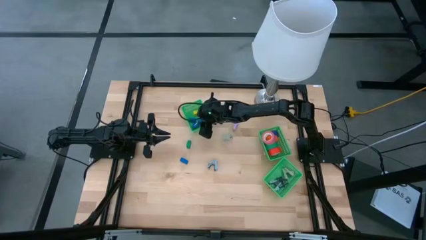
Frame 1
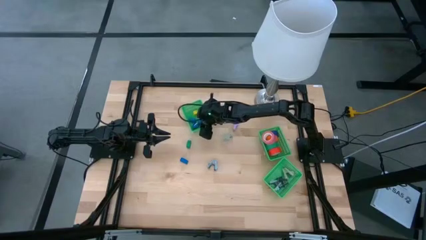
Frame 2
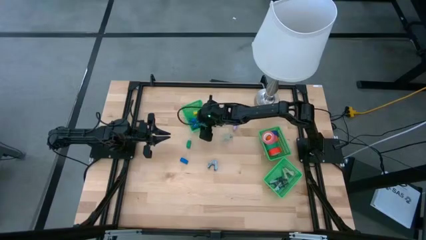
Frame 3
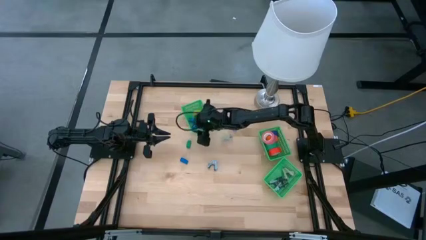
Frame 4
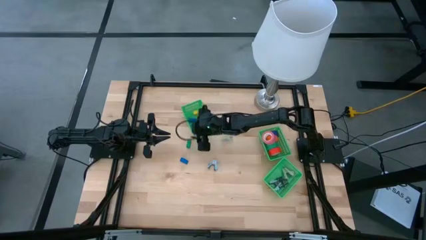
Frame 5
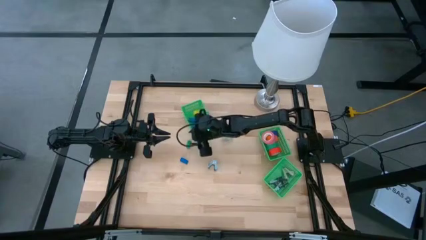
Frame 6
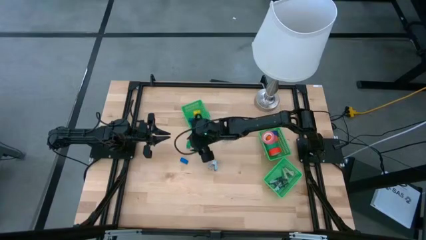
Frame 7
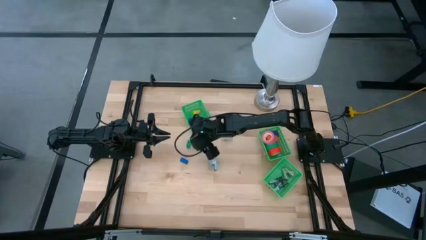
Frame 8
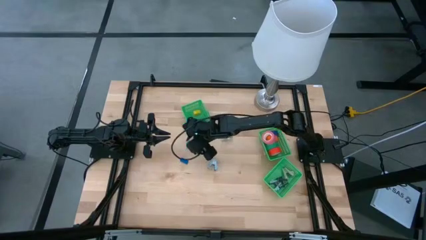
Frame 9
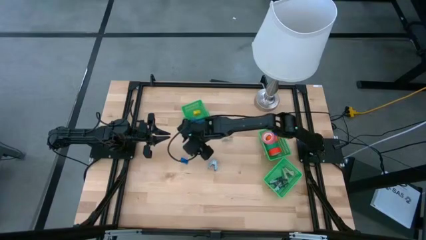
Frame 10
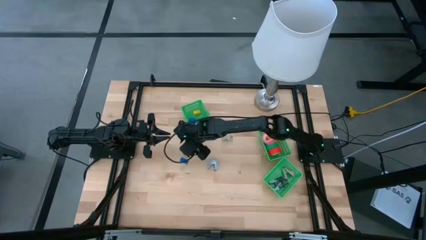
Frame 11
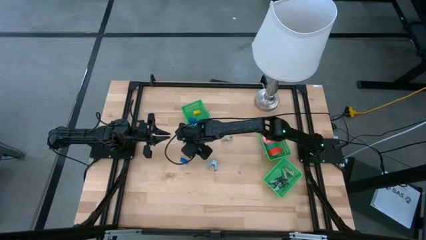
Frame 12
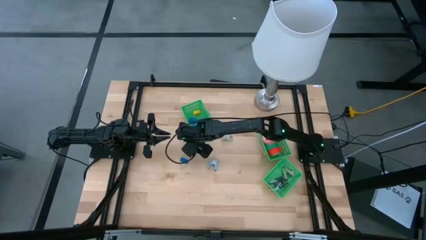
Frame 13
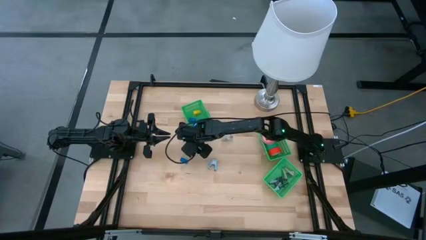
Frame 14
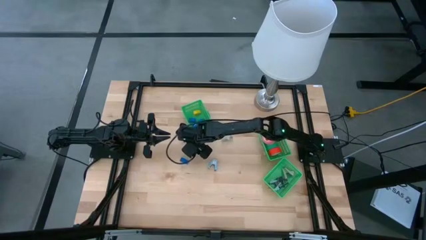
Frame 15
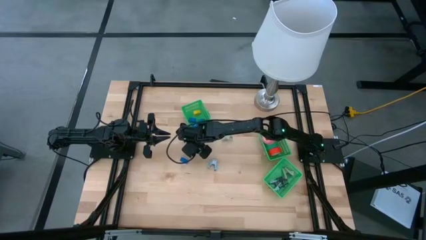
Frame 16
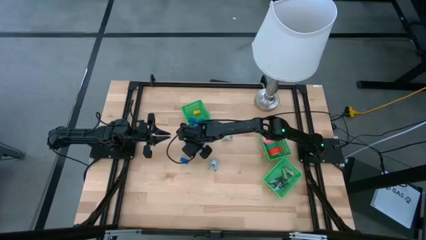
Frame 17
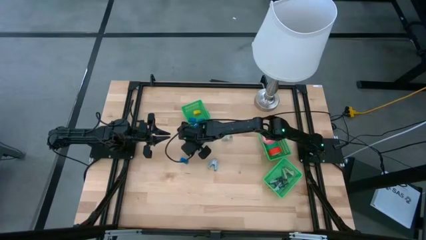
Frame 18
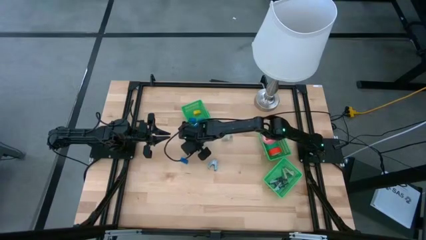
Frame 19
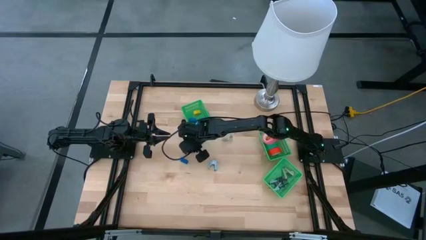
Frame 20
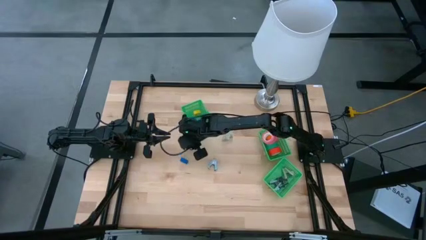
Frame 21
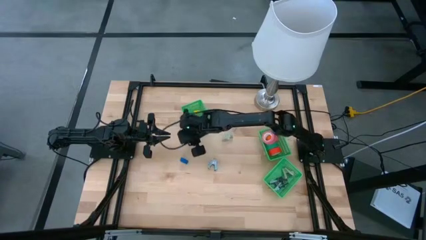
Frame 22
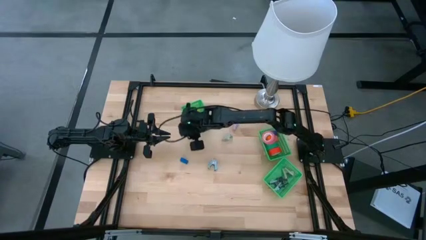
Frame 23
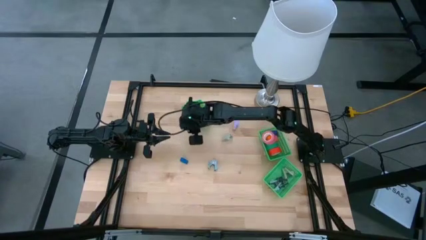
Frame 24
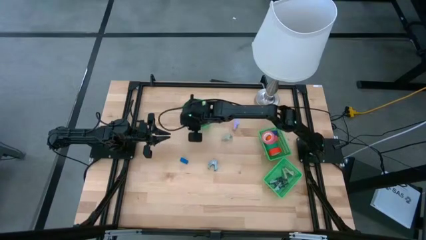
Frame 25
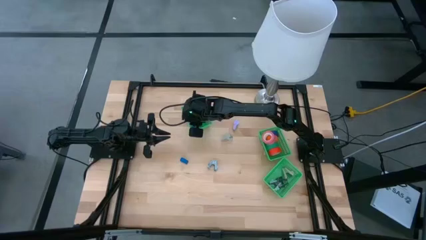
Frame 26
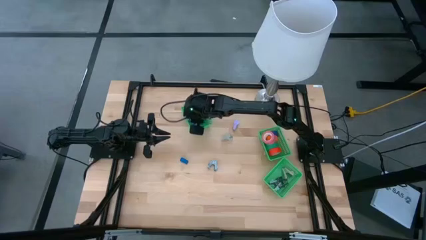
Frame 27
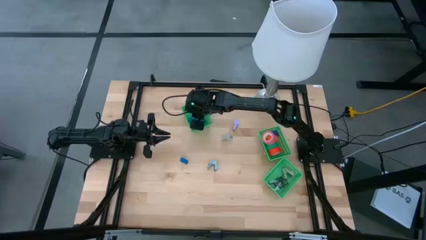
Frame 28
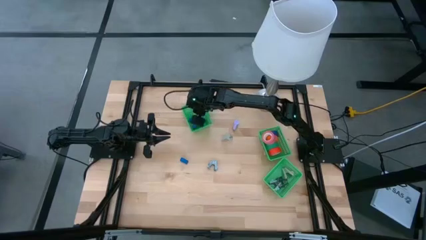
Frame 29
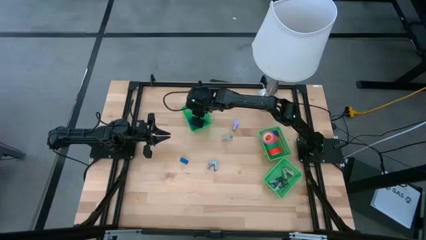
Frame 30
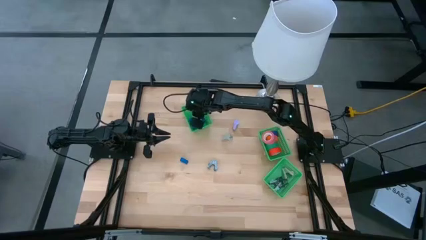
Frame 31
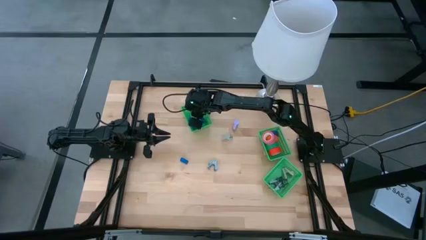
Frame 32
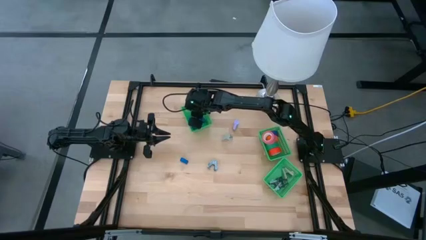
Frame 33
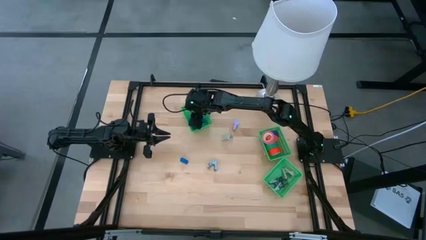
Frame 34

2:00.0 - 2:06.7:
Task: Pick and place Stapler, Stapler remover, tape
Put the green stapler into the top left green bin

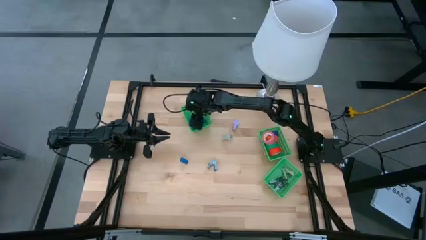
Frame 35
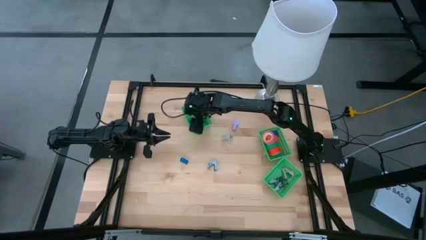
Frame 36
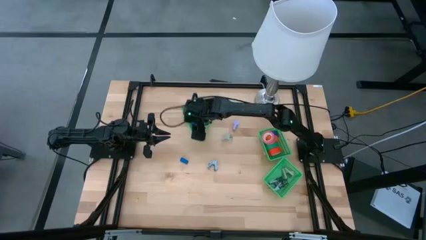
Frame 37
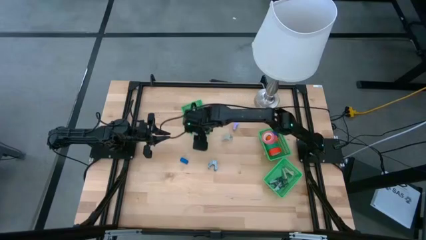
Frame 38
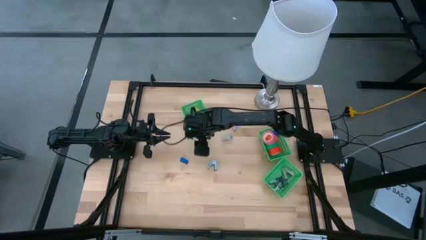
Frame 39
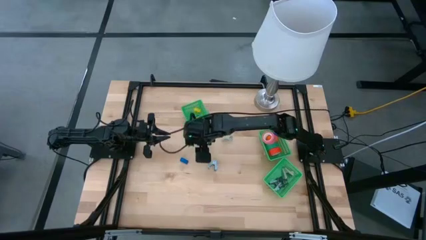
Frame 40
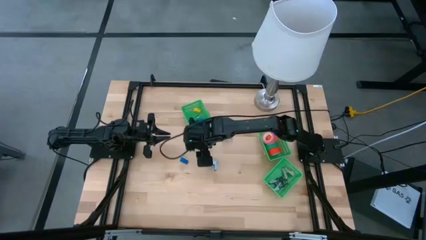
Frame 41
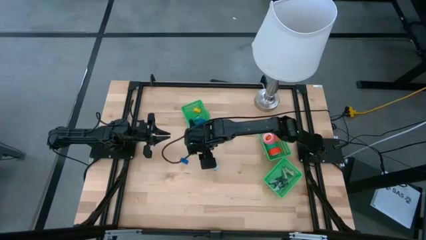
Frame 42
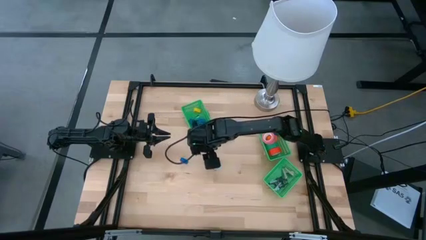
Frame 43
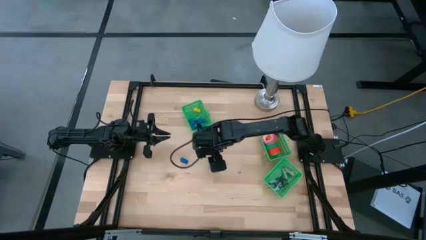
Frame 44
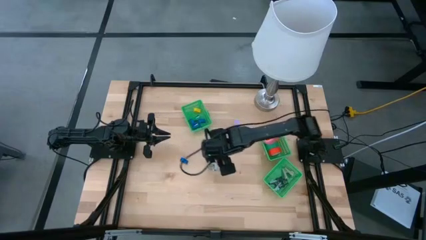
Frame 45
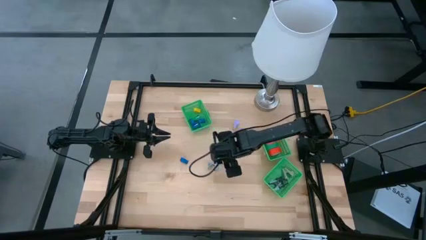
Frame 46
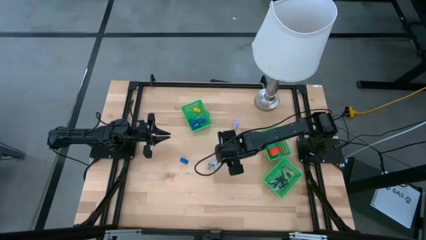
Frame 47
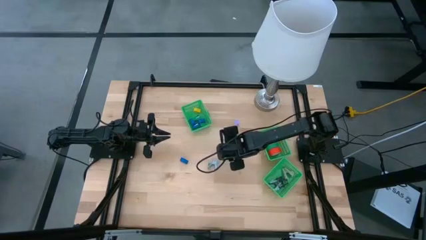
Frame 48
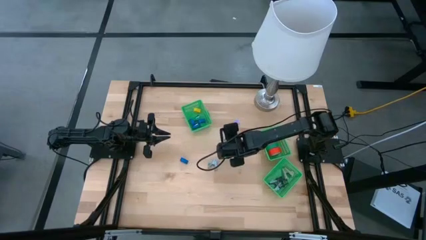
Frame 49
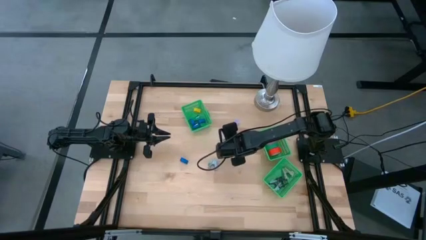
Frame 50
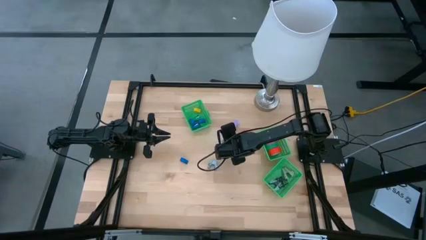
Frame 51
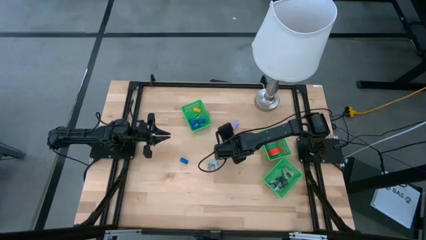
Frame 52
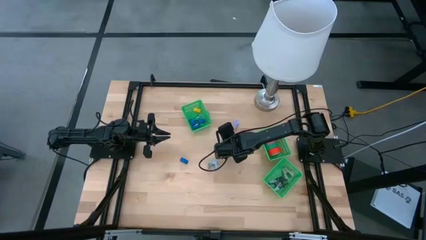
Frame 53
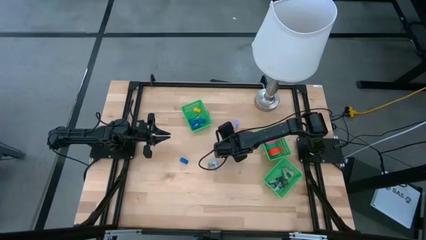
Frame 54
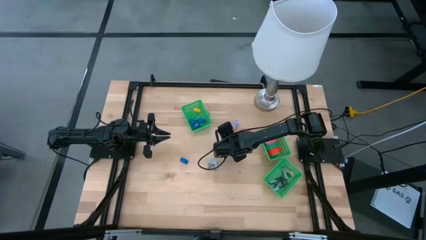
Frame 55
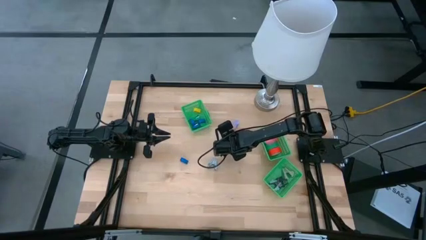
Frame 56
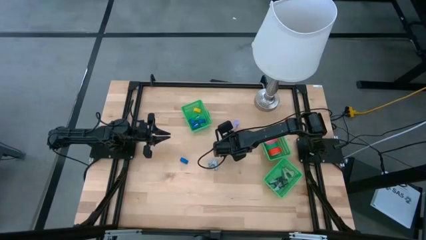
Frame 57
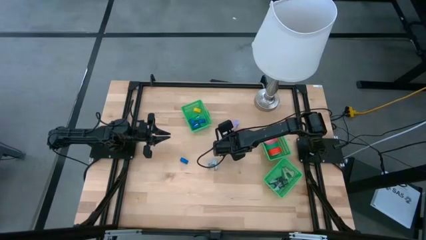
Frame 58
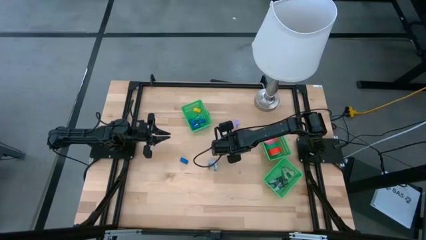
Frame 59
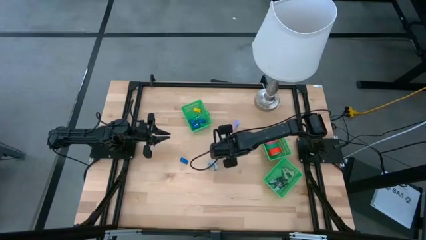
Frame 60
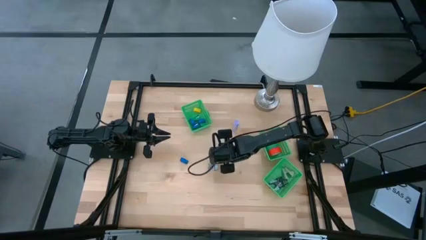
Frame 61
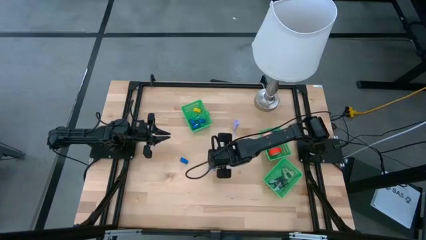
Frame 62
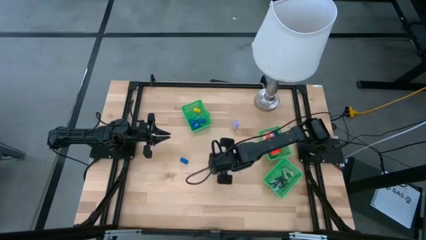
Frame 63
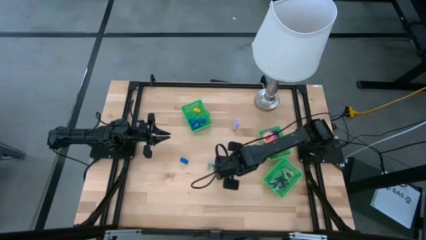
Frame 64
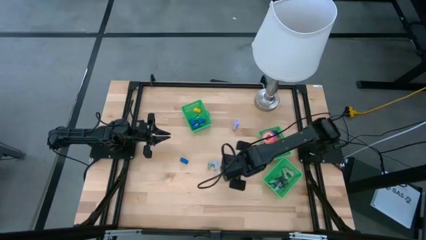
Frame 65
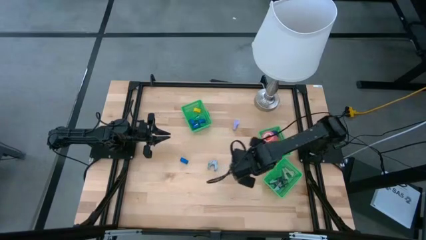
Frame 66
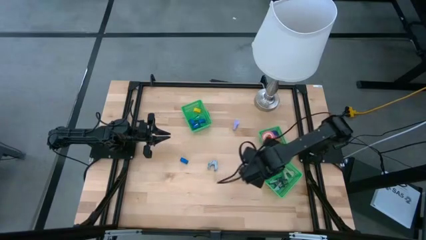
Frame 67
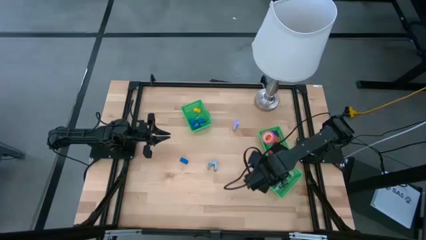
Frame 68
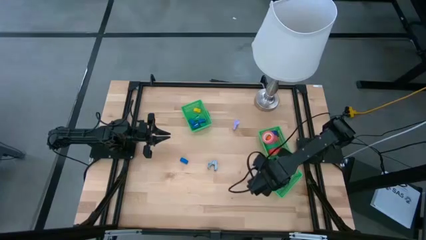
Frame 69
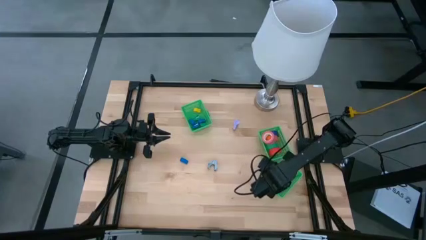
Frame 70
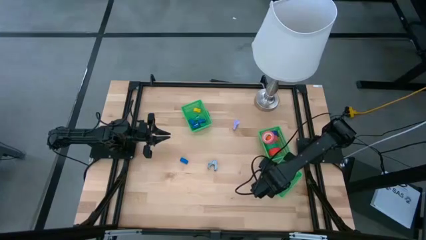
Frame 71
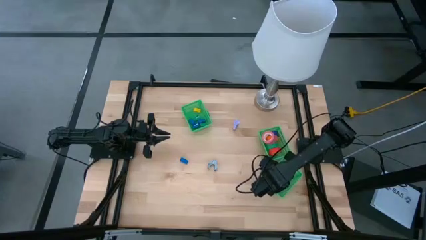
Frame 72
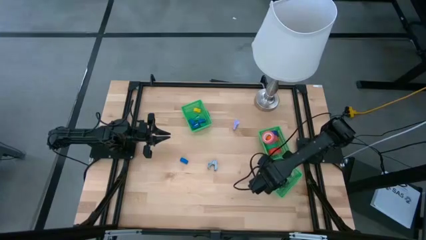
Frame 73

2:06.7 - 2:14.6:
Put the gray staple remover into the bottom left green bin

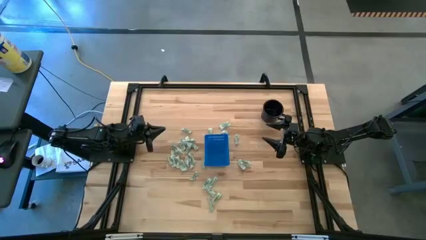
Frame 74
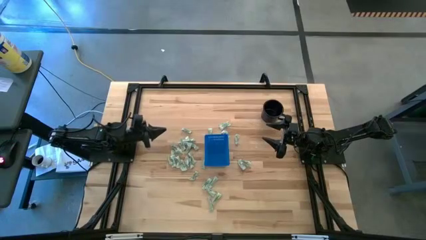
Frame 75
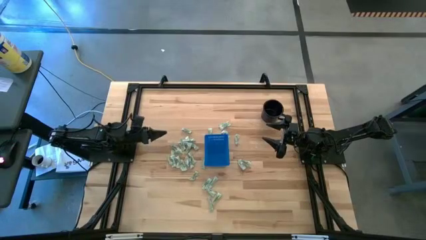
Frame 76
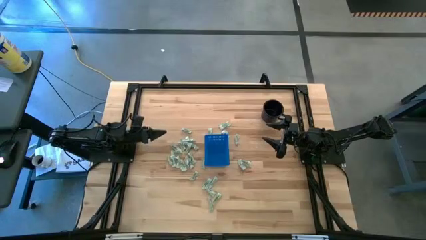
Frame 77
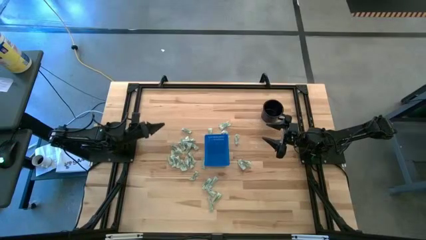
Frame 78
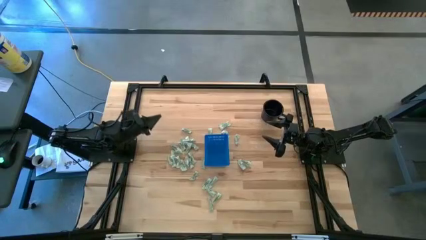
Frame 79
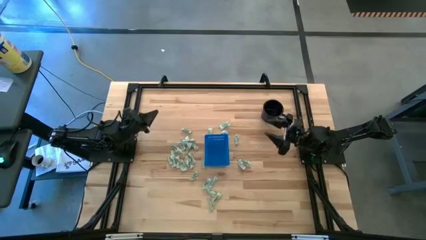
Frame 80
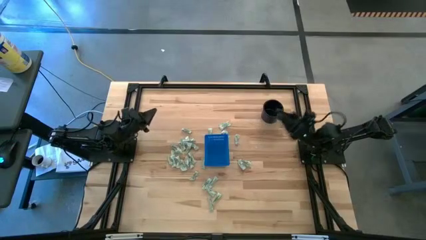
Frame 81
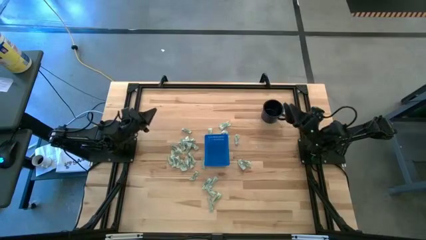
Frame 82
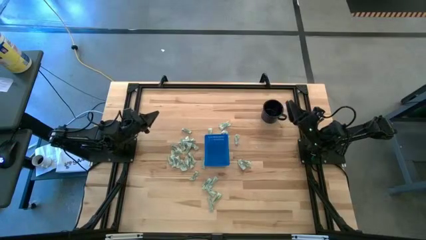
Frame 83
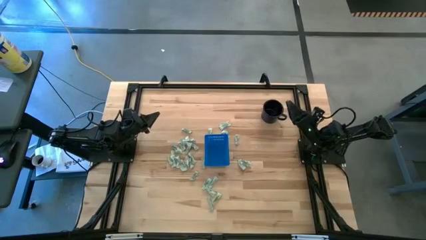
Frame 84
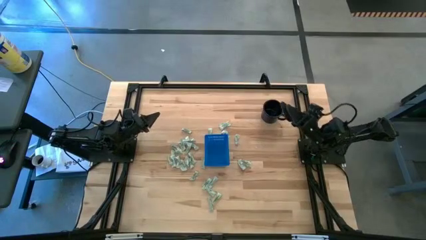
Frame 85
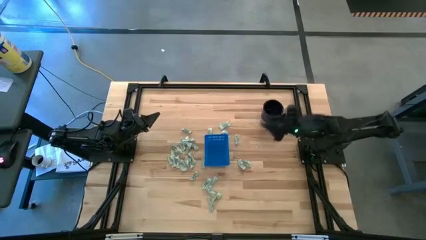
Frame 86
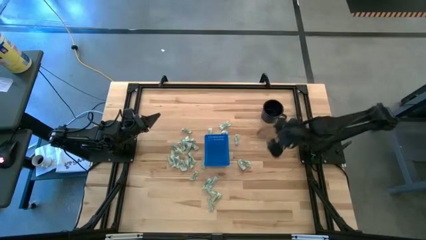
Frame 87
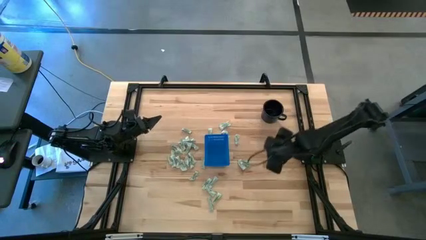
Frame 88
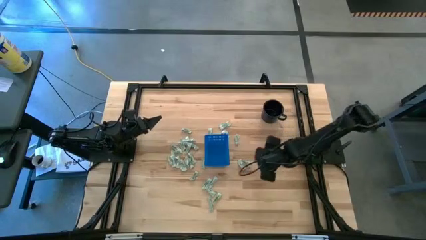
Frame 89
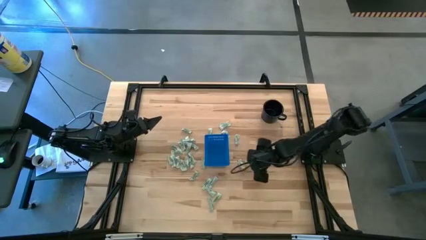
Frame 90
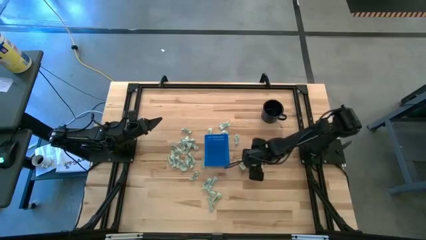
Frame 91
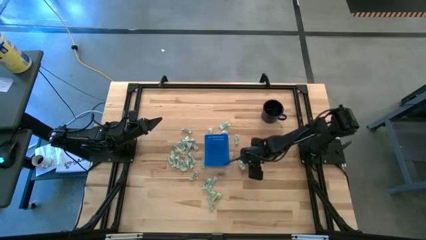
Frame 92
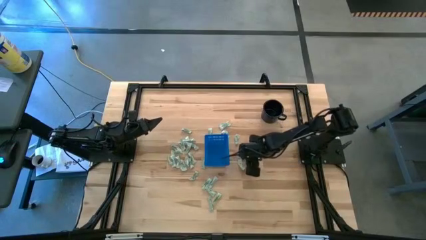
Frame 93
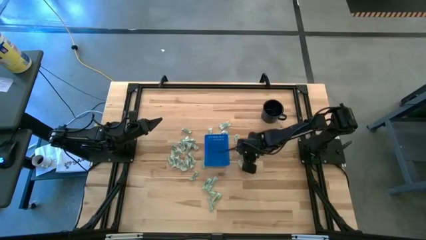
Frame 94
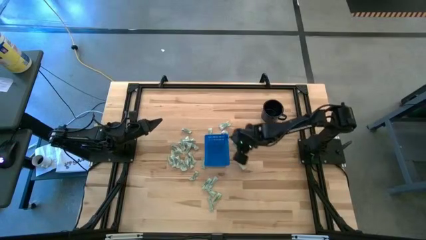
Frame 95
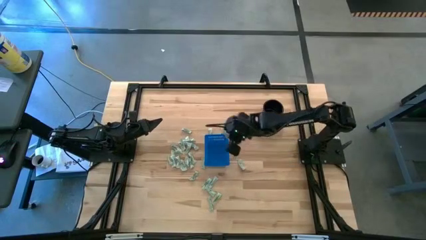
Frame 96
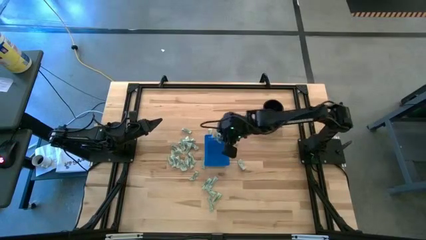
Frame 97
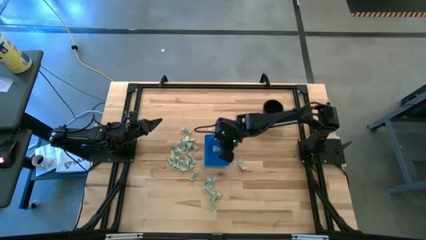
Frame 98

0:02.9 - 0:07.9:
Task: Pick and place Stevia / Truvia into bins
Put the stevia packet into the basket
